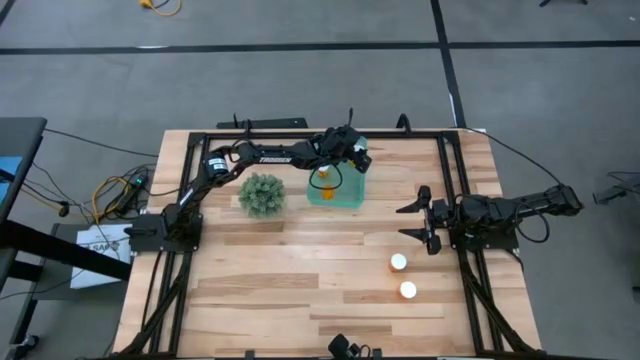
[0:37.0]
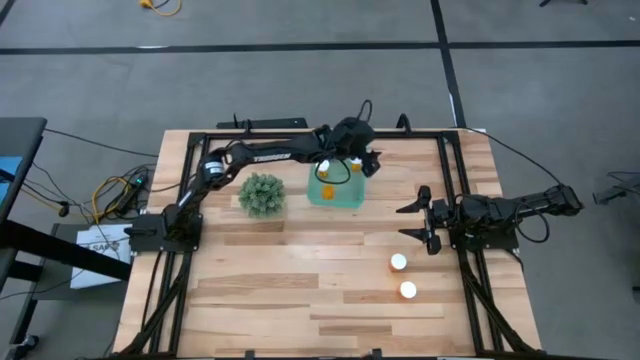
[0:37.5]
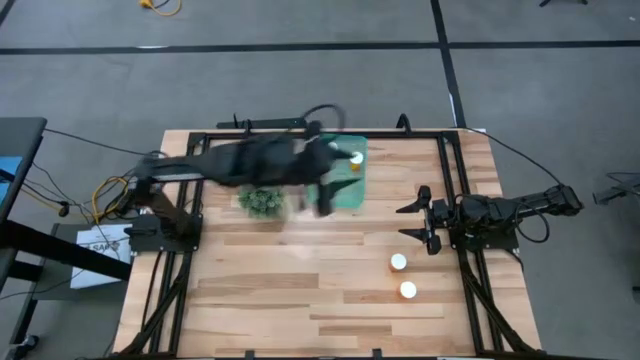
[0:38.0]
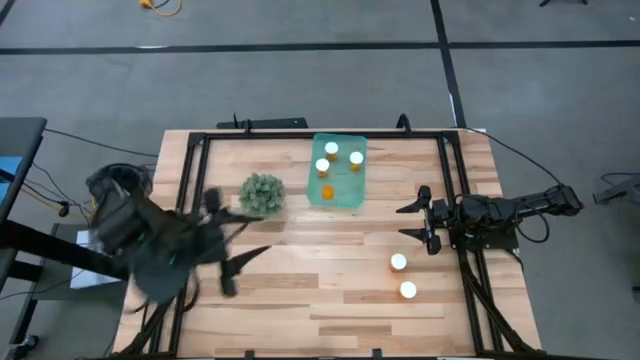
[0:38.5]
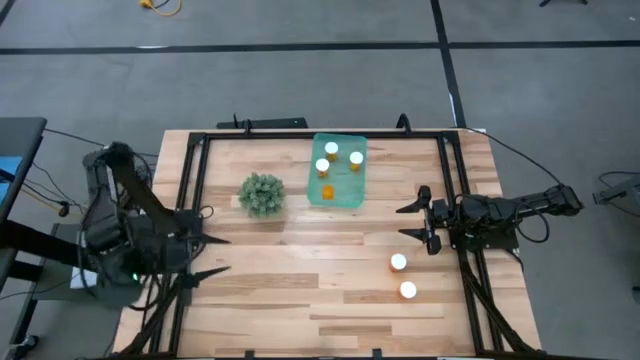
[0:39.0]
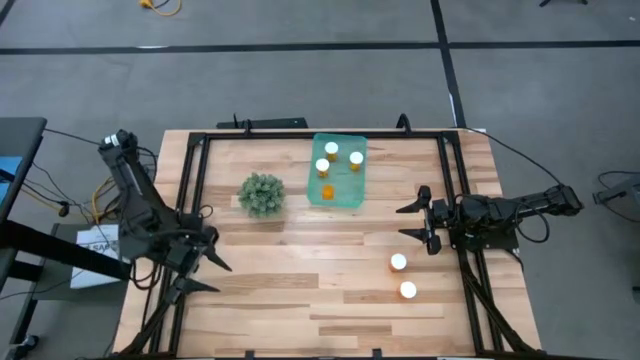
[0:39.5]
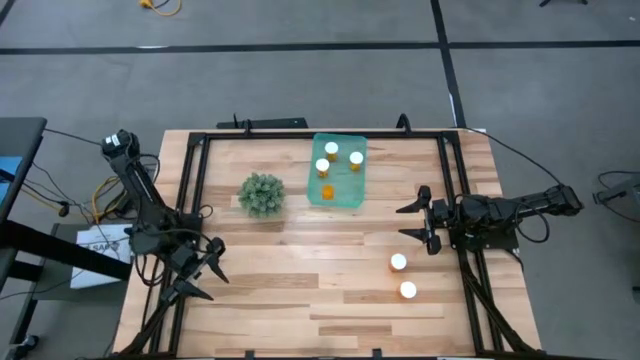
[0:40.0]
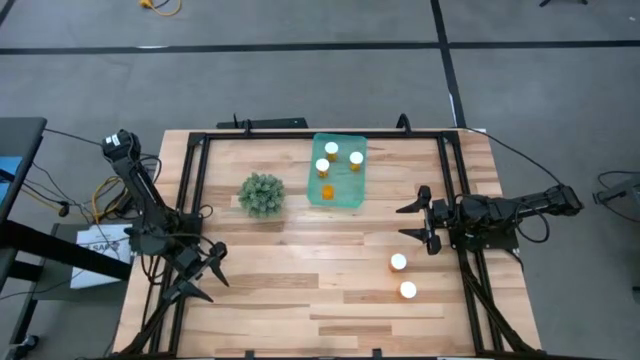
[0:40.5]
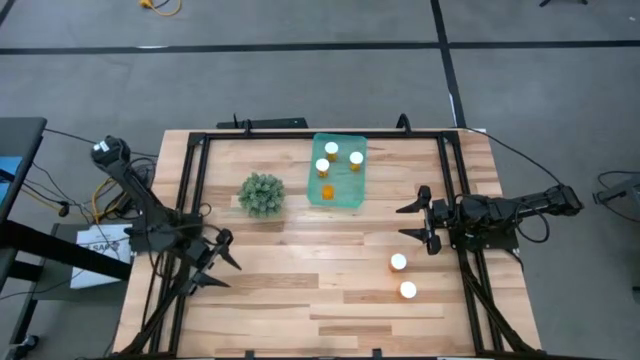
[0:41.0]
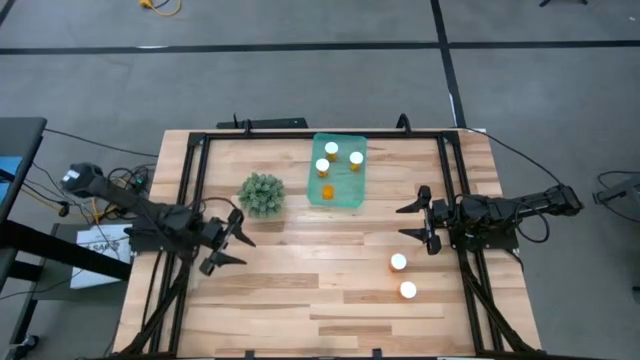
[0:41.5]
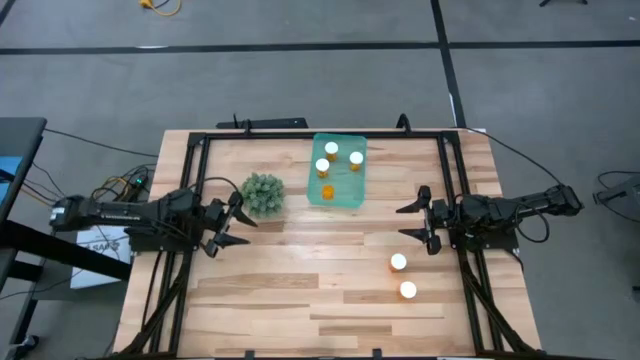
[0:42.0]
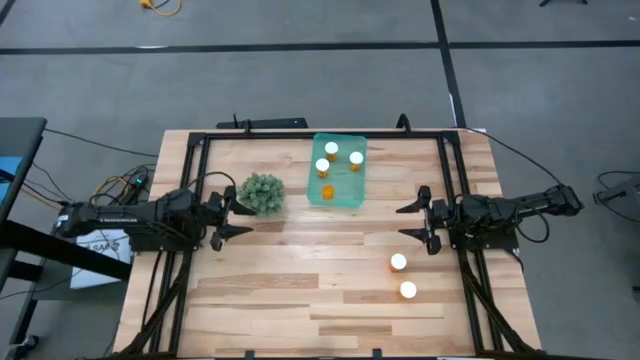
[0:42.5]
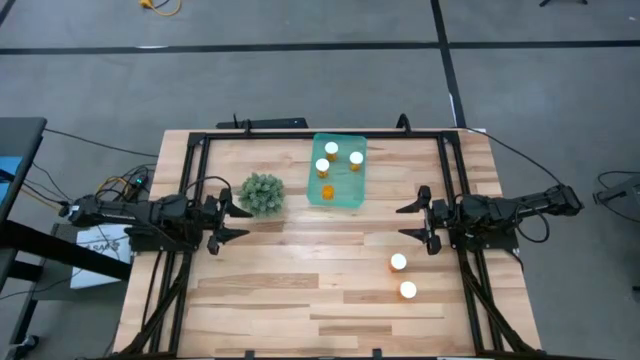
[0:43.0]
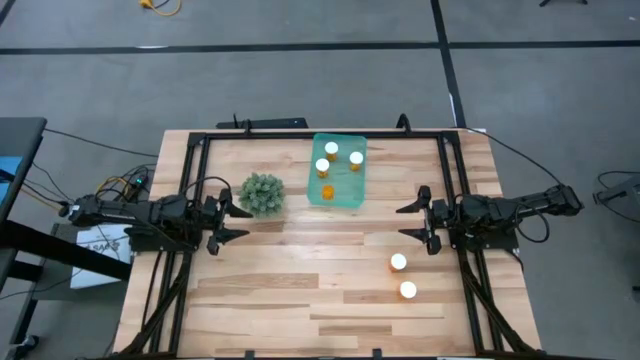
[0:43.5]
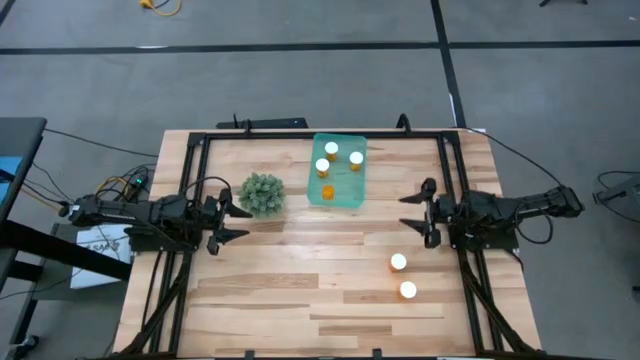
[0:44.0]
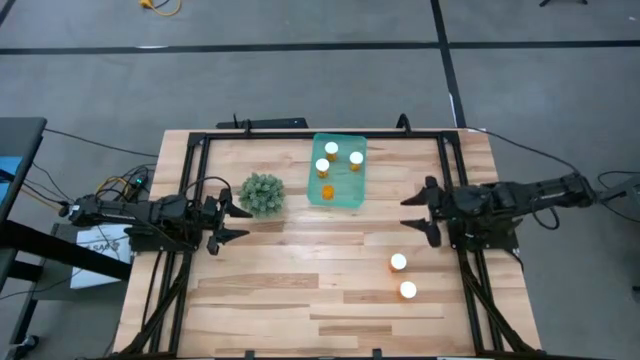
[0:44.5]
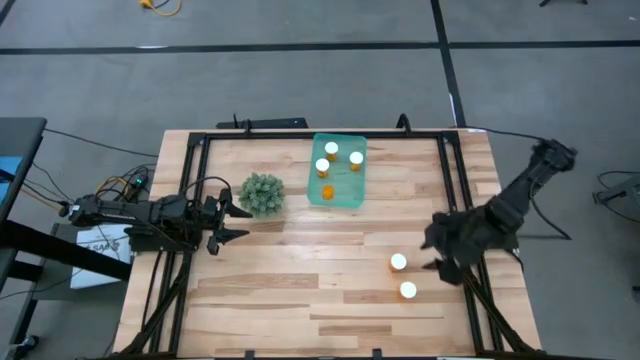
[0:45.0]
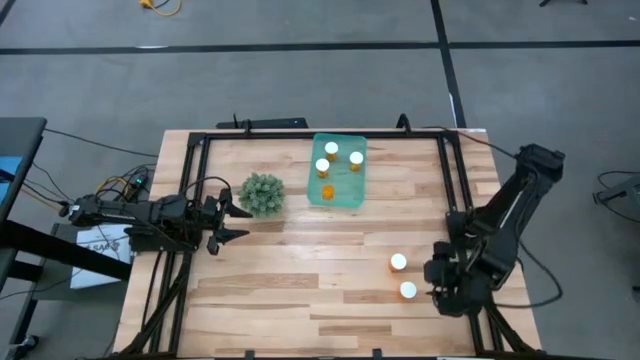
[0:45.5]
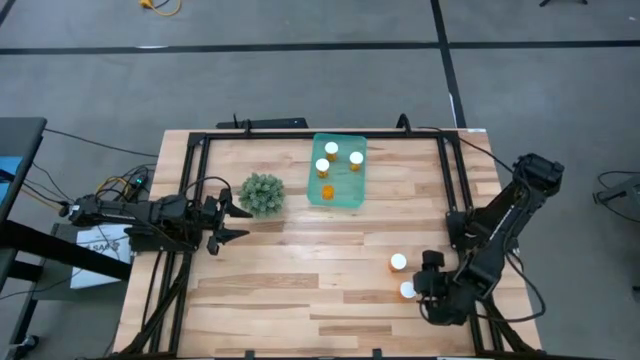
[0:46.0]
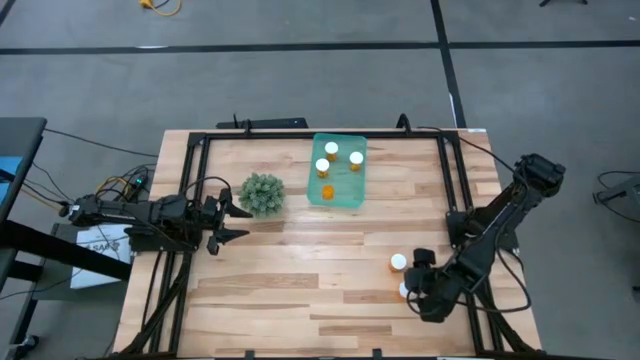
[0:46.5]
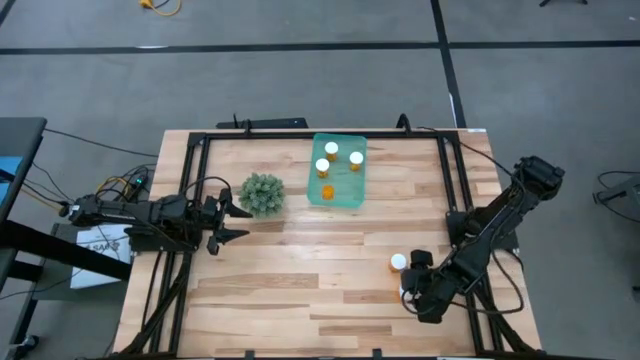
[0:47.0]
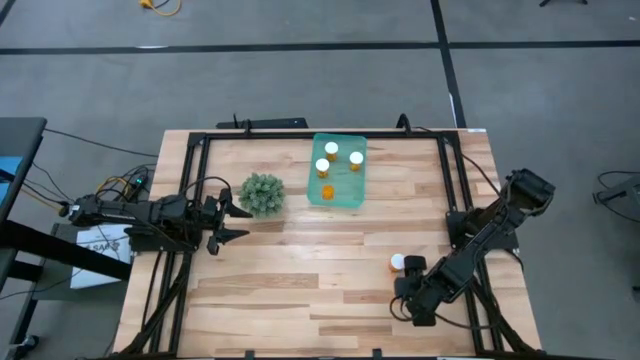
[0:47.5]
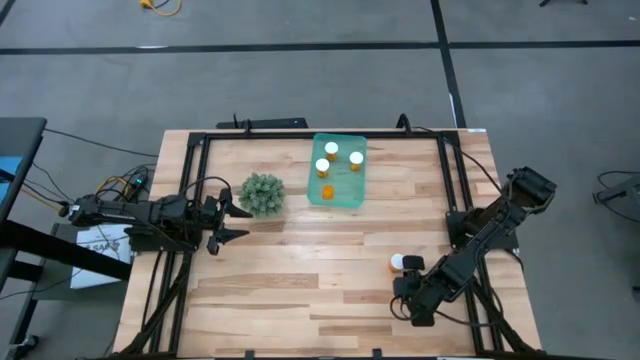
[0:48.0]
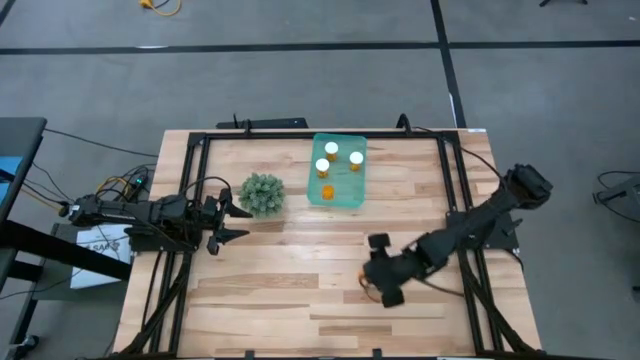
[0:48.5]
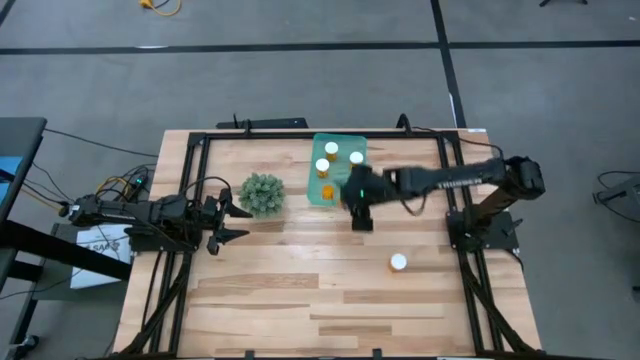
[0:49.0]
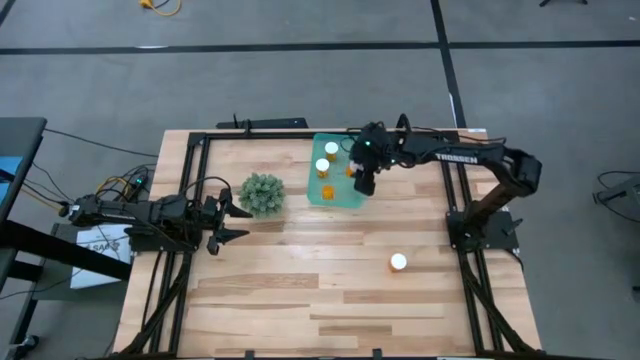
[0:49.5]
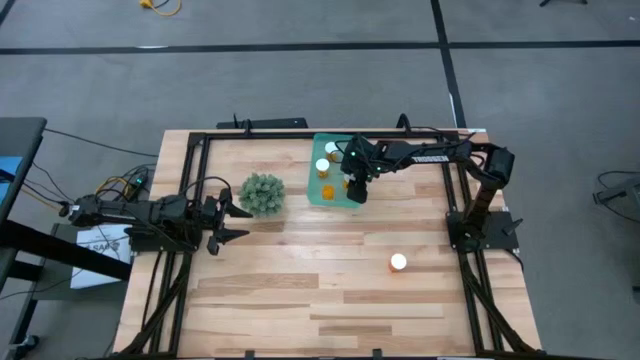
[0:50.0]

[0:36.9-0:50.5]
Task: Pick and place pill bottles into a basket
Put the orange pill bottle into the green bin

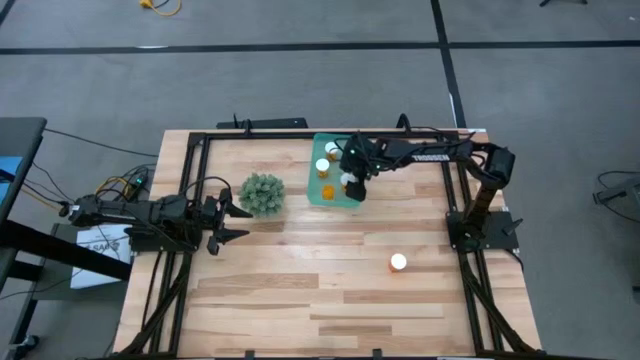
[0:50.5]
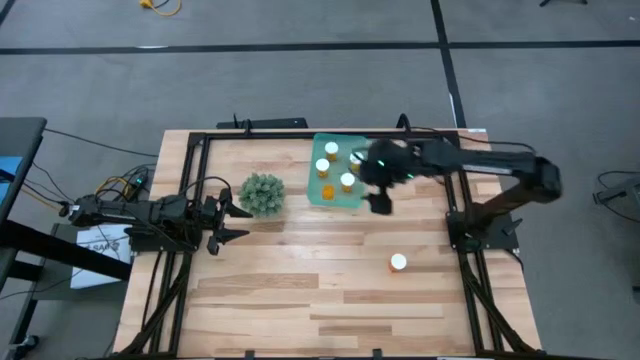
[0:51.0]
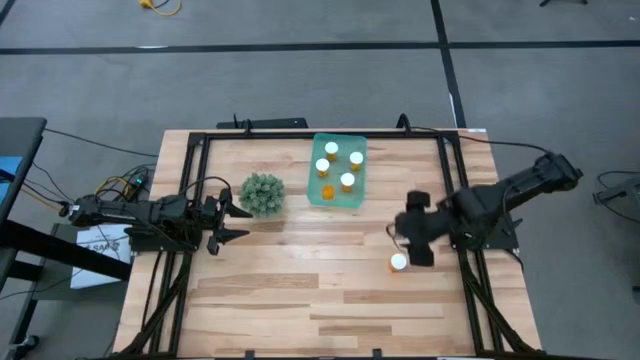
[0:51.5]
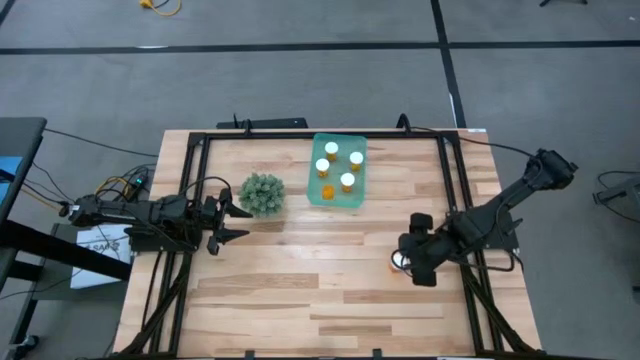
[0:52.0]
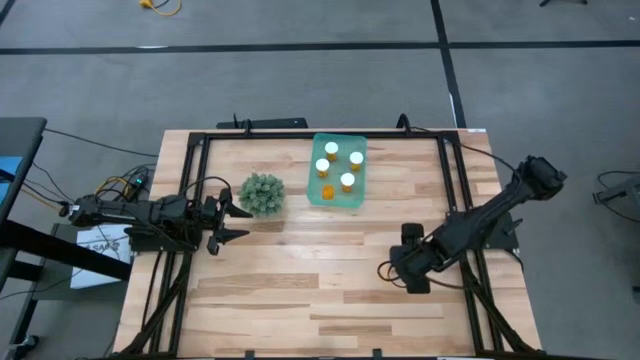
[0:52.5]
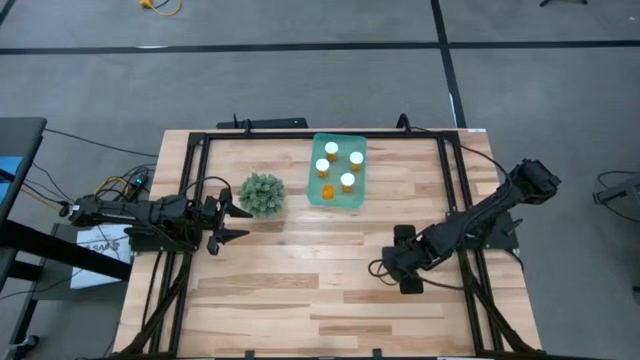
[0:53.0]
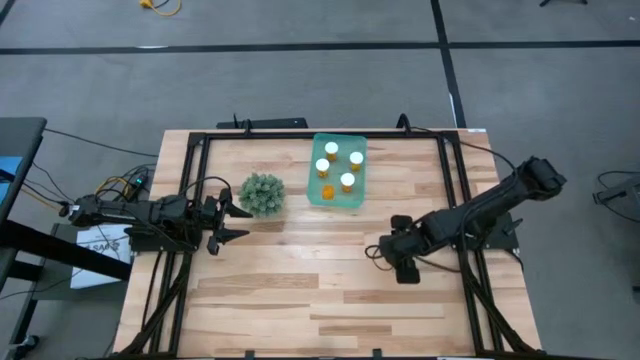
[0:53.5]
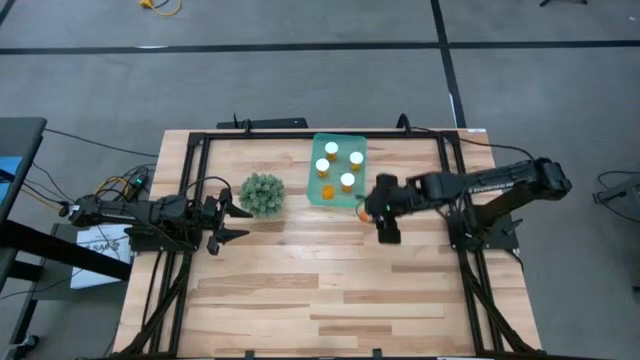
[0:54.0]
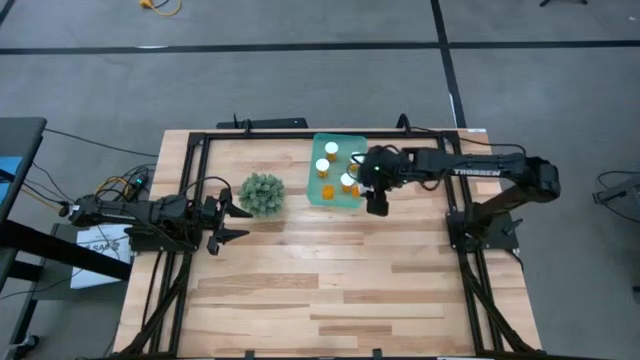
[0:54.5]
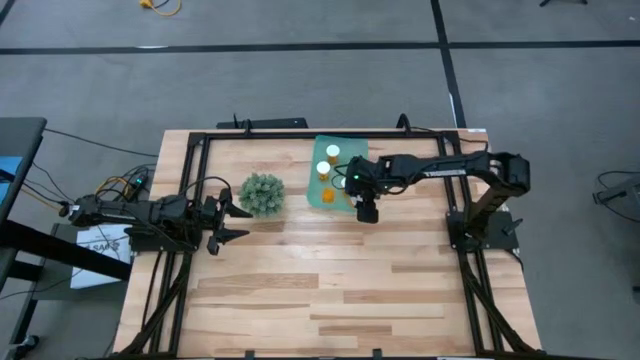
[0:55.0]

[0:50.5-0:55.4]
Put the orange pill bottle into the green bin

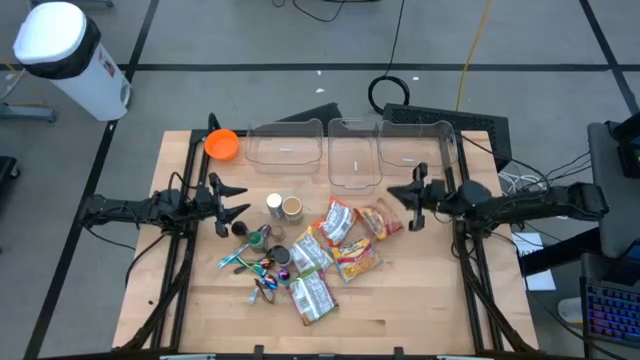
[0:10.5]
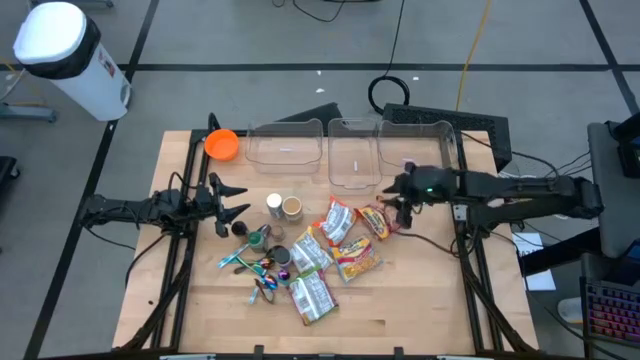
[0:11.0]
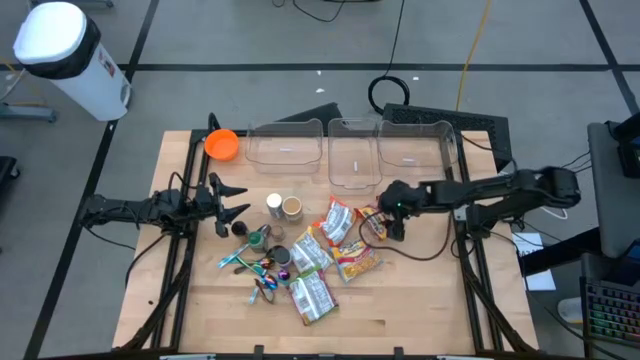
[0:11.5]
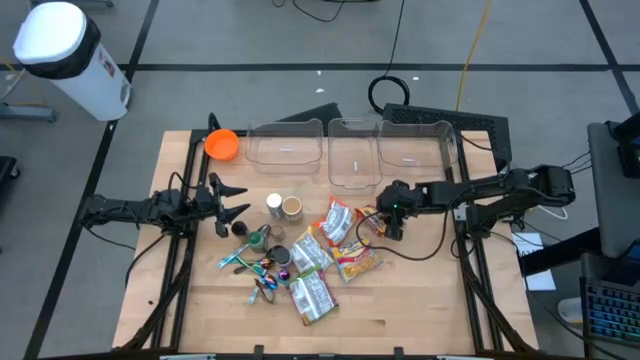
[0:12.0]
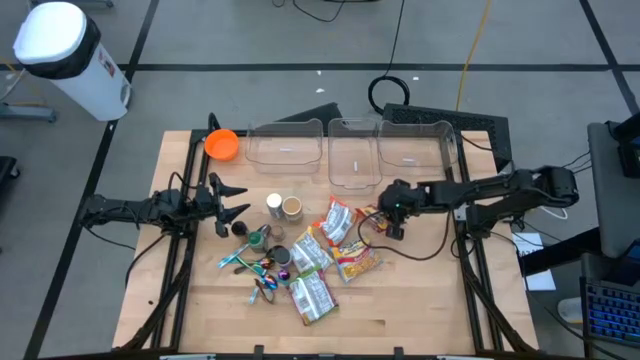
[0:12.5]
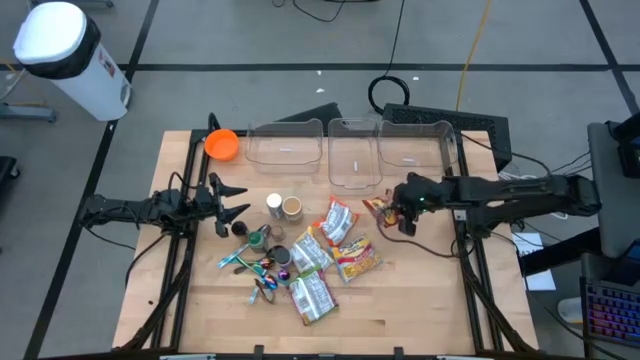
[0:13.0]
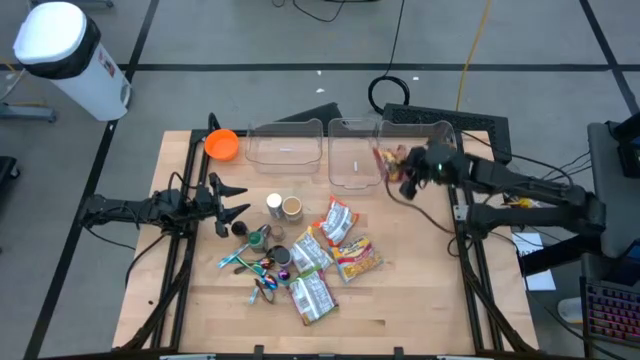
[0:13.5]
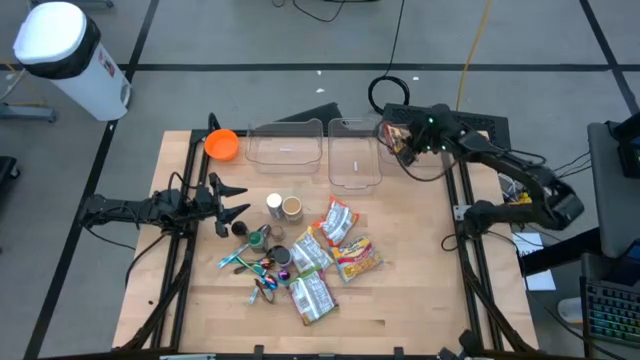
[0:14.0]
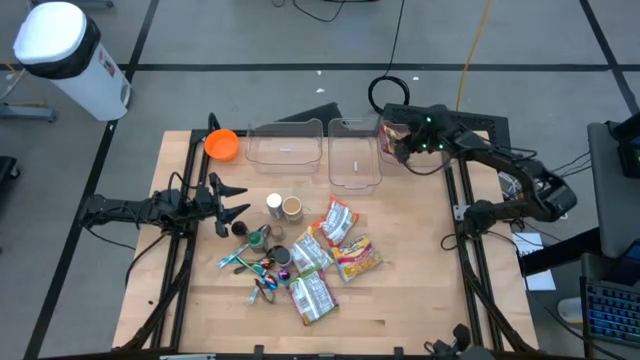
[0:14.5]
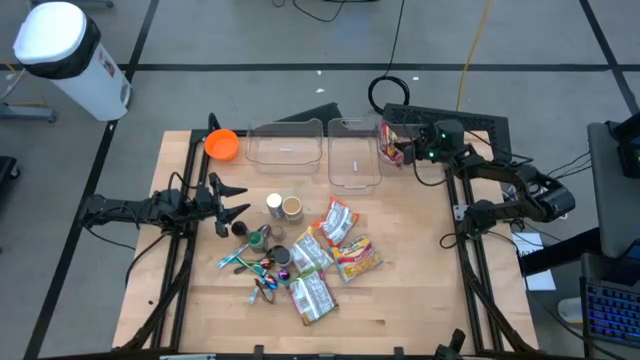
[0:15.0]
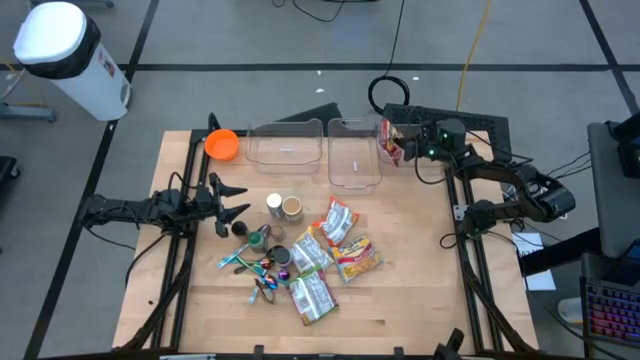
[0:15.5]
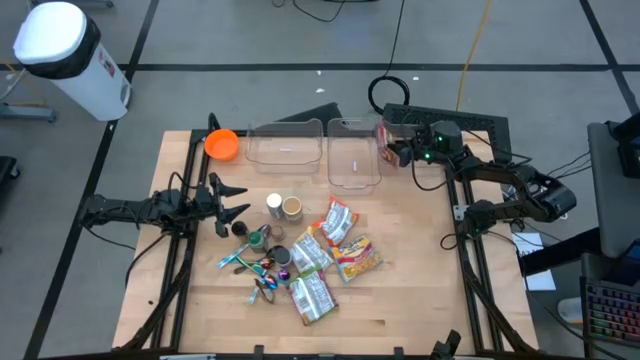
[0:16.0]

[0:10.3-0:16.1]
Task: Pick & Place Food Item
Put the top noodle pack into the right transparent bin
